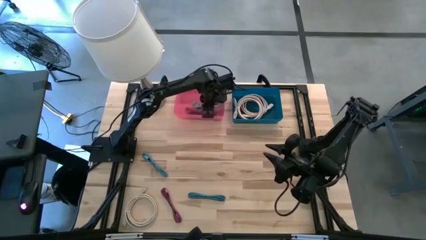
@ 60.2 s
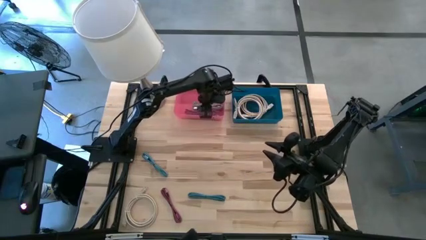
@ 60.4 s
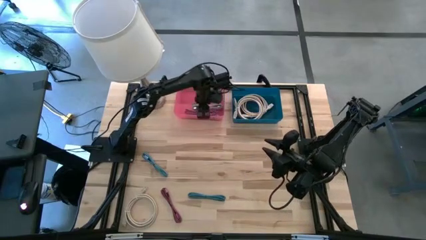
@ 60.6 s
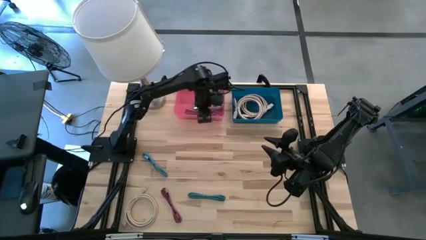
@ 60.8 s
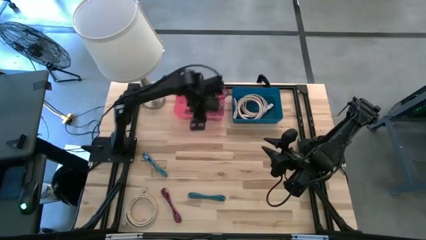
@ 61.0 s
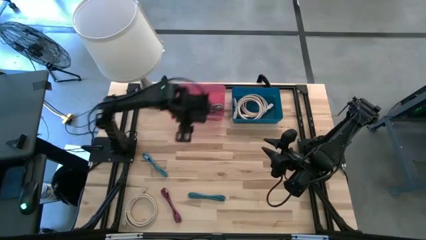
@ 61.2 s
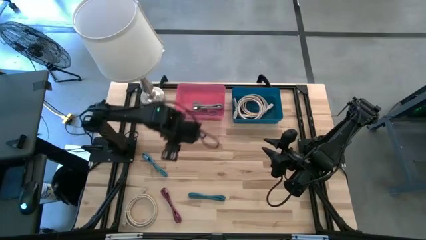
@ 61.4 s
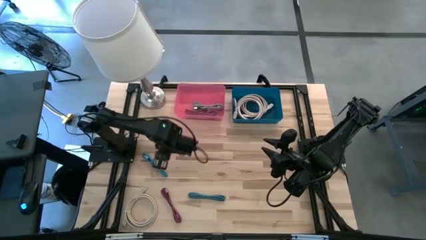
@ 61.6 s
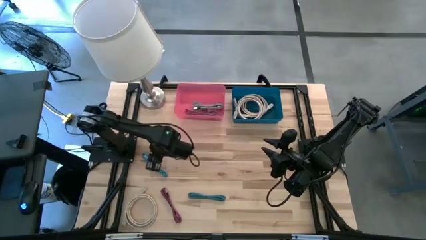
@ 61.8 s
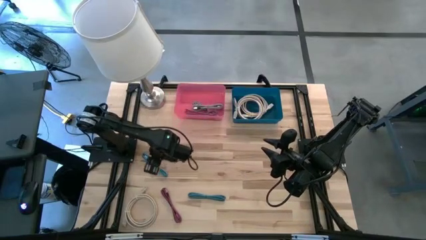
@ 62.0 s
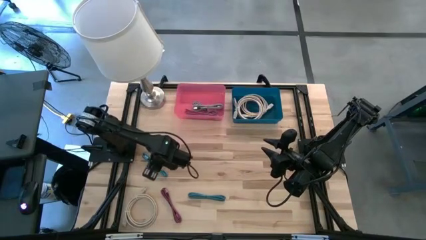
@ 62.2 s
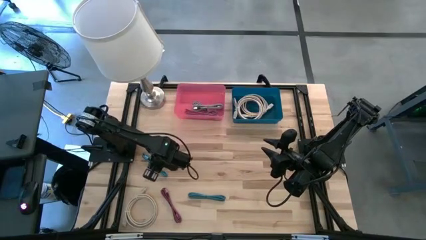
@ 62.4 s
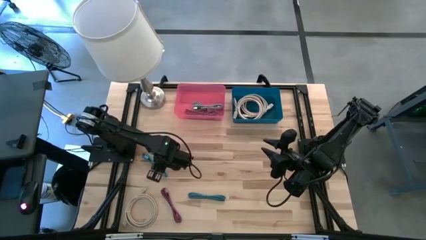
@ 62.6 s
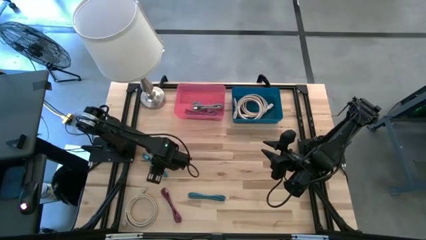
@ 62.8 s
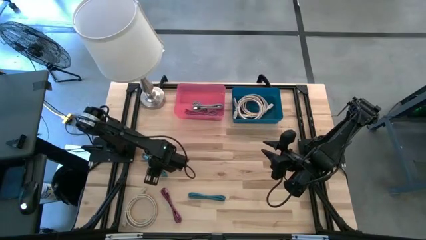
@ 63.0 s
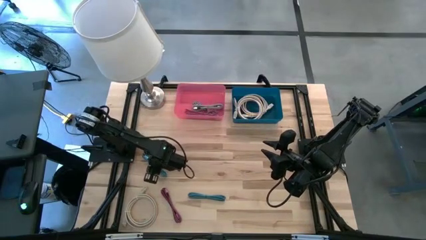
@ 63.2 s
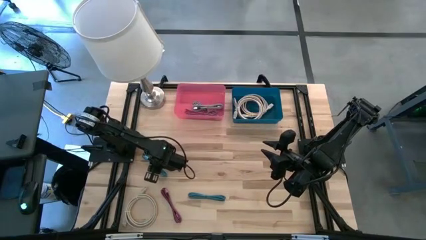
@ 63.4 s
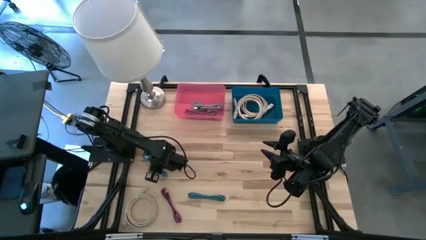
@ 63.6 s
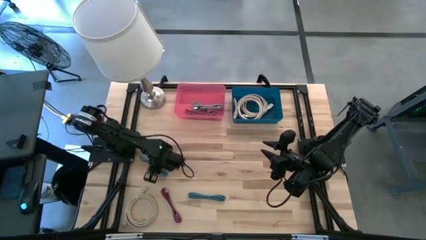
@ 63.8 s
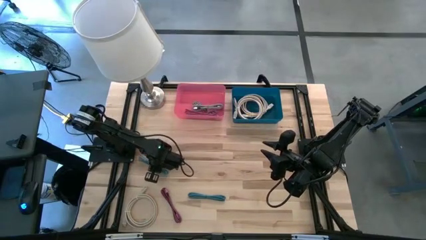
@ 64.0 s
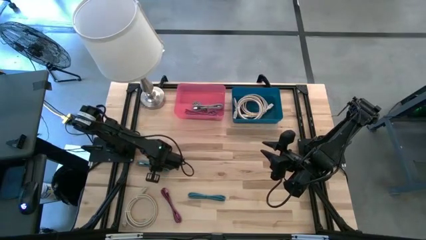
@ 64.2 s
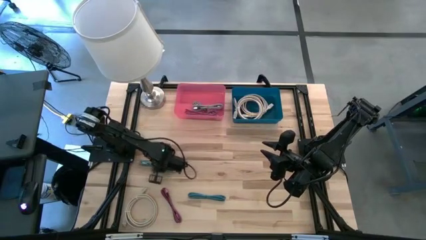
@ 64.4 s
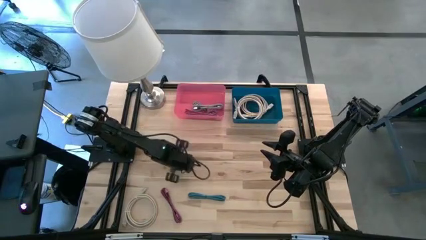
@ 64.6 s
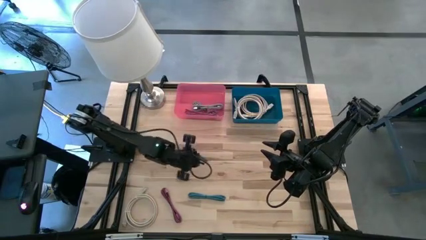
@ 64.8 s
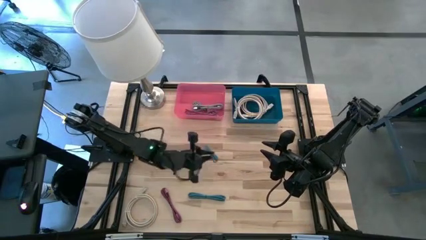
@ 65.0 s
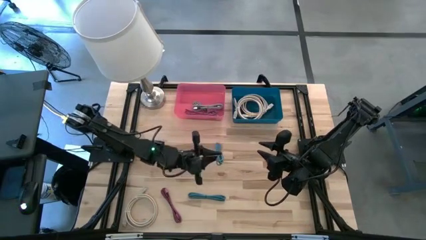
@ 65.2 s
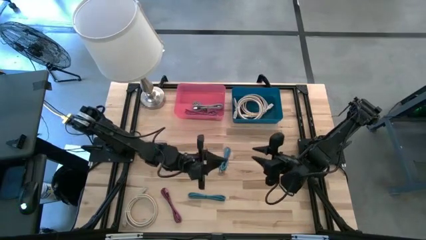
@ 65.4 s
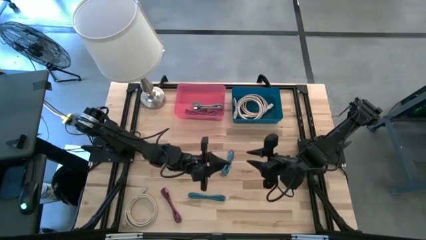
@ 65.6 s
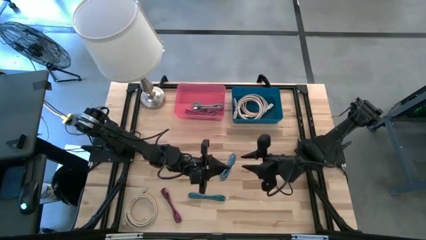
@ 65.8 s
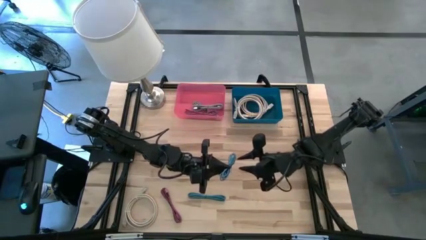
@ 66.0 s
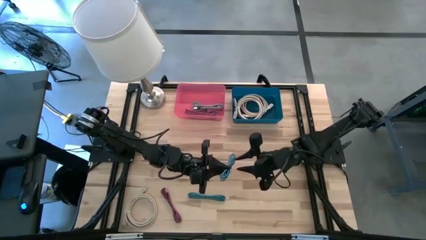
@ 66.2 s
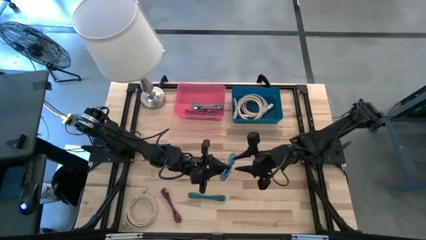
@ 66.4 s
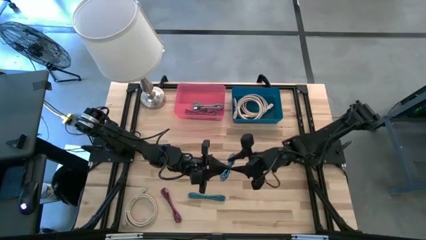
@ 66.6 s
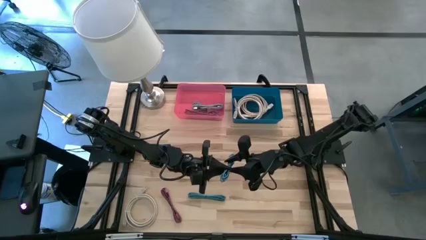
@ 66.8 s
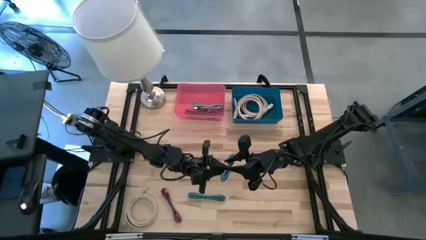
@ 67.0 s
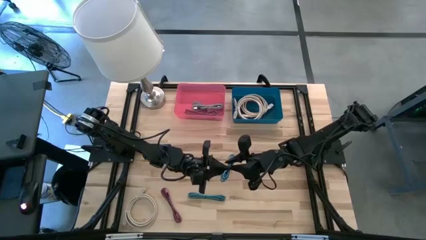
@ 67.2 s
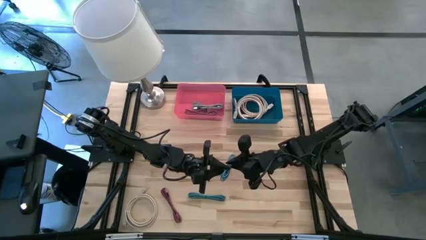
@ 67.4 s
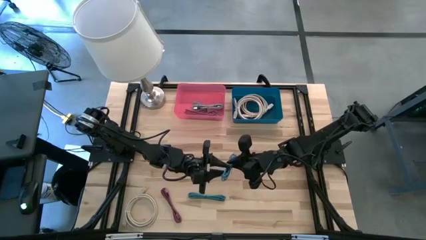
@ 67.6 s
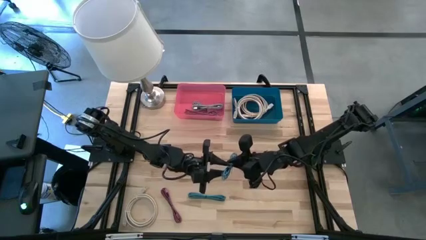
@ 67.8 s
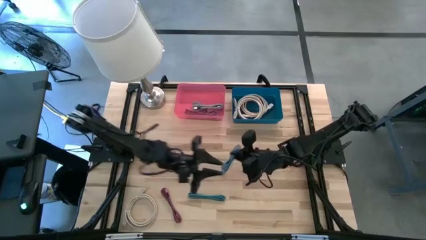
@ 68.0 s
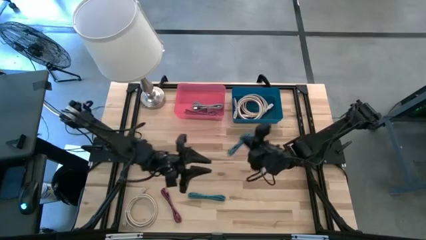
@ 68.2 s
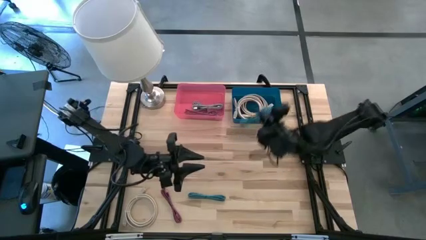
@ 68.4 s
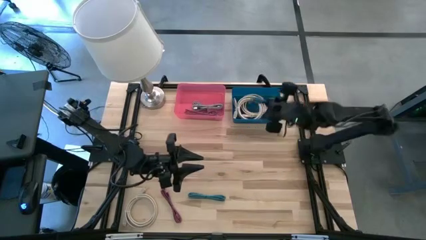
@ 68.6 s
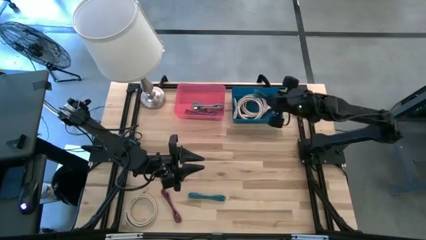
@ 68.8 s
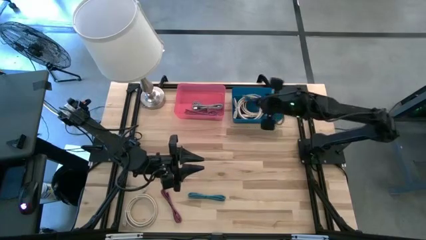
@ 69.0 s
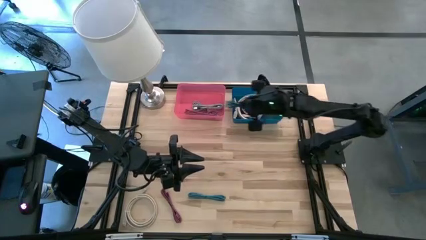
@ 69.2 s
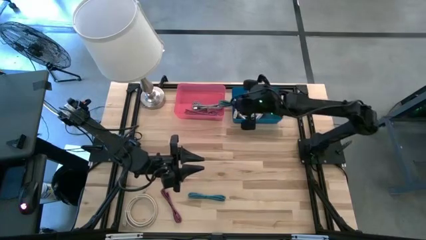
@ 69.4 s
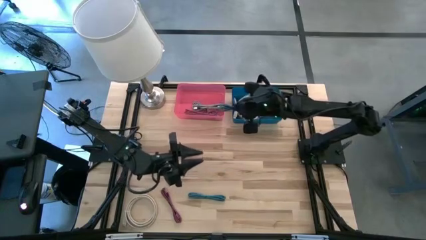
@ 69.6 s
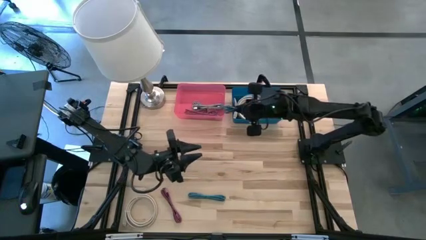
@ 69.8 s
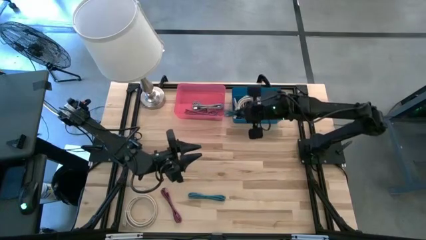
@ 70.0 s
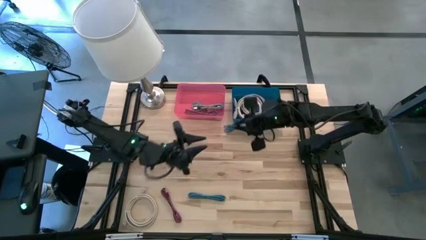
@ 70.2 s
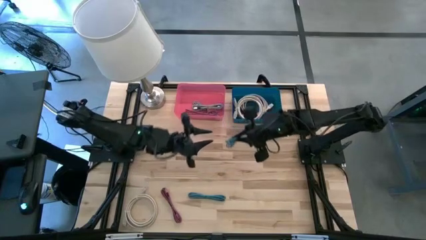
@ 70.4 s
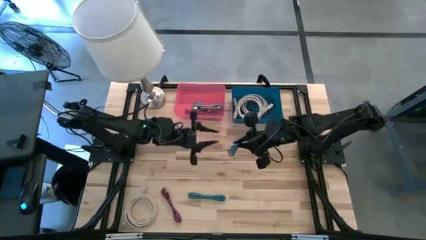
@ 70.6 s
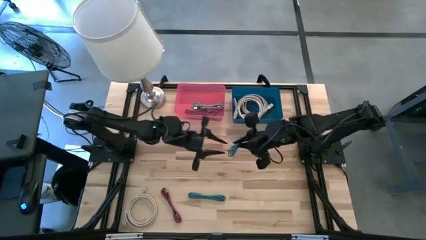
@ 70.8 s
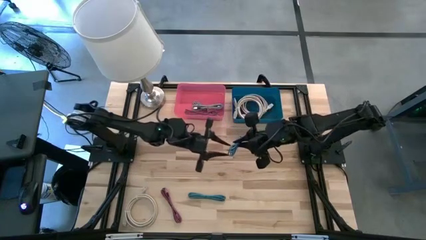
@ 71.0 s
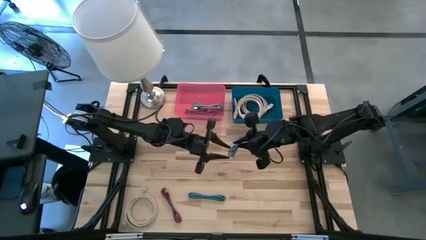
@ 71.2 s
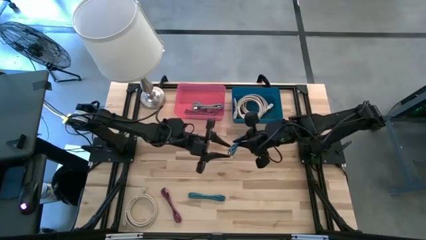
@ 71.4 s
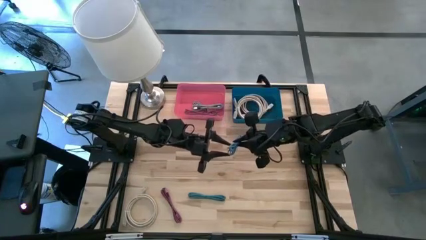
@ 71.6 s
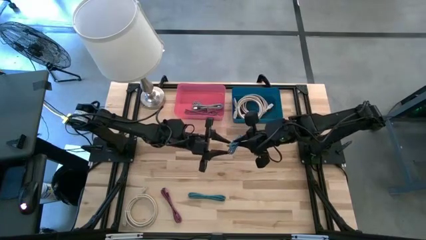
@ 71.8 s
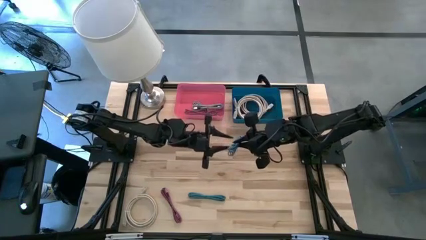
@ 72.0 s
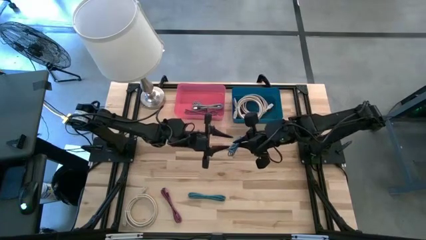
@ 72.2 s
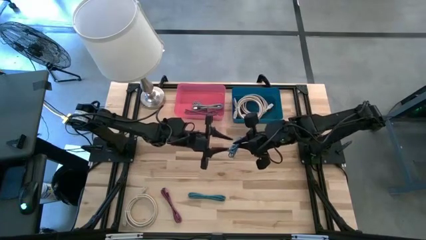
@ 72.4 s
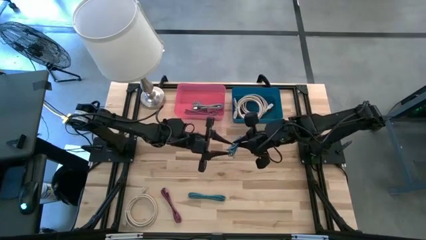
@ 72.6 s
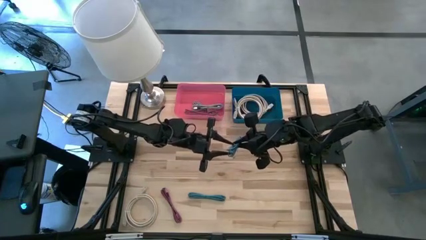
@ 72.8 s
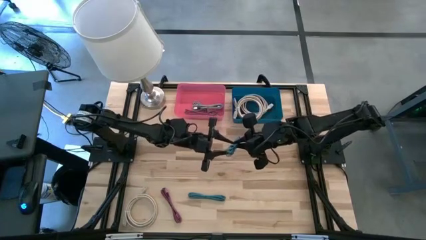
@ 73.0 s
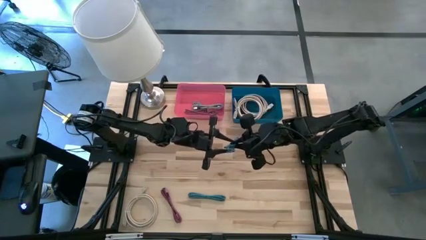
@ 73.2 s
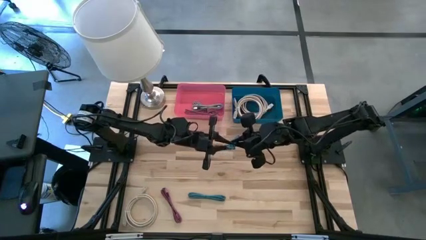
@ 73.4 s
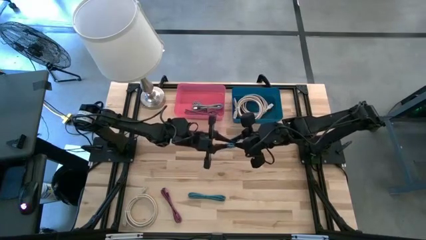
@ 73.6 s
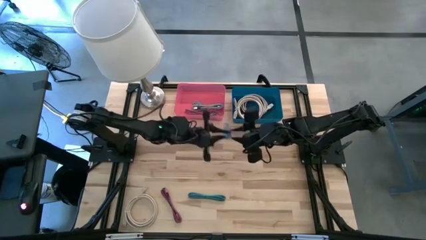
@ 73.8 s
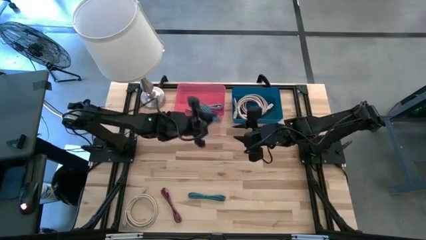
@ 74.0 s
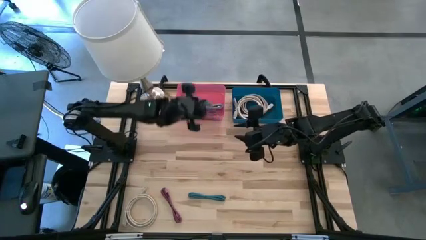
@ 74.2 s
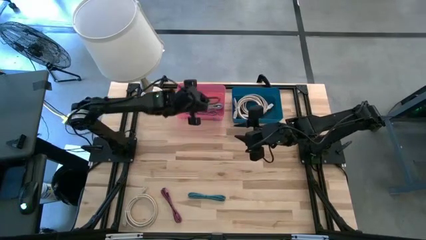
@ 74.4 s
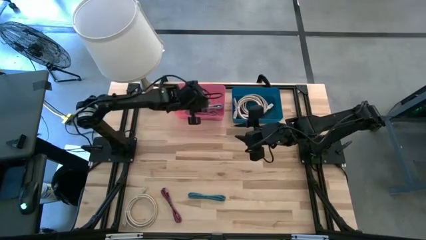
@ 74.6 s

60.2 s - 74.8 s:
Task: Pick & Place USB Port
Put the top black and blue charger cable into the red bin
